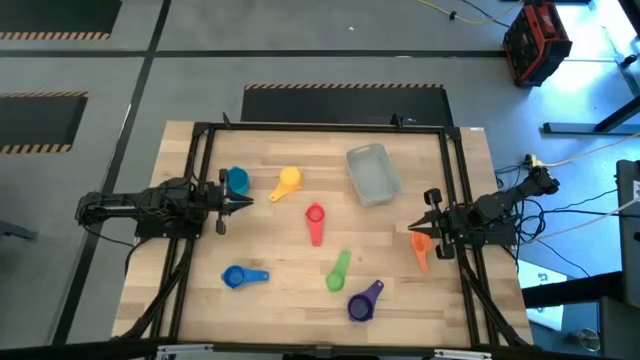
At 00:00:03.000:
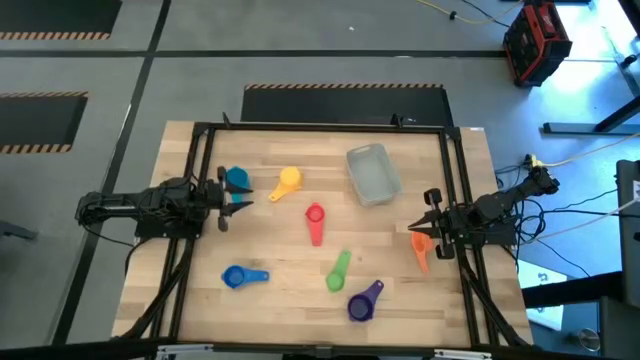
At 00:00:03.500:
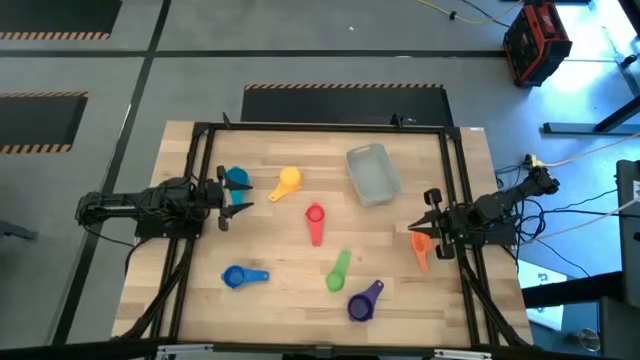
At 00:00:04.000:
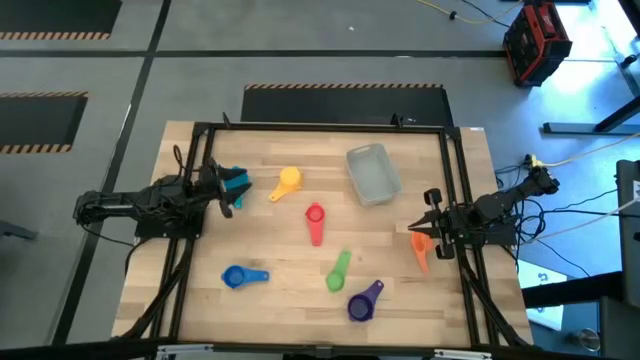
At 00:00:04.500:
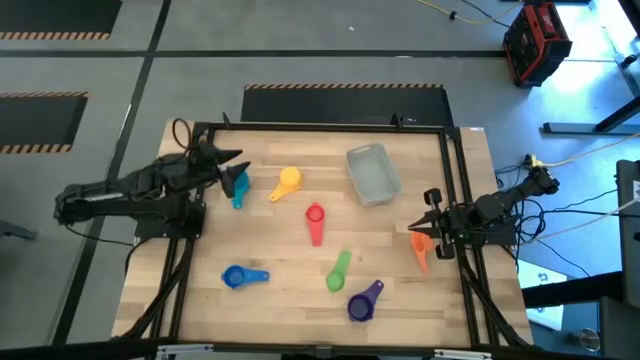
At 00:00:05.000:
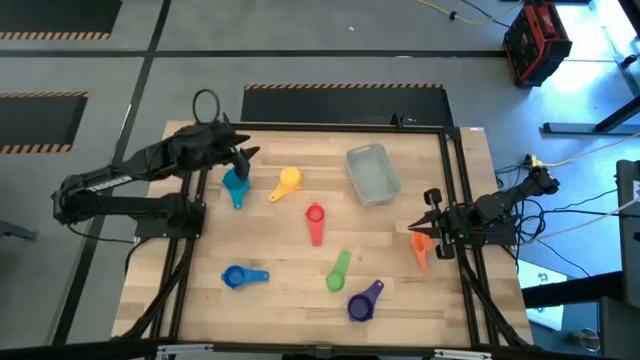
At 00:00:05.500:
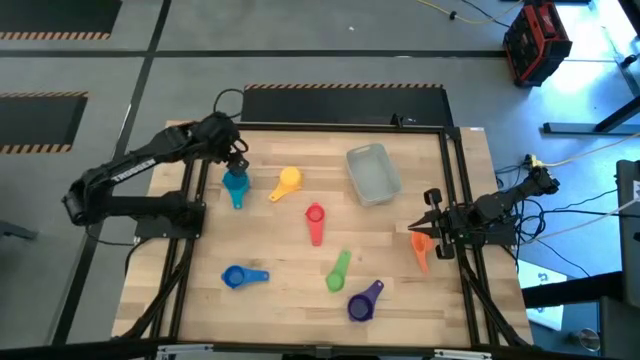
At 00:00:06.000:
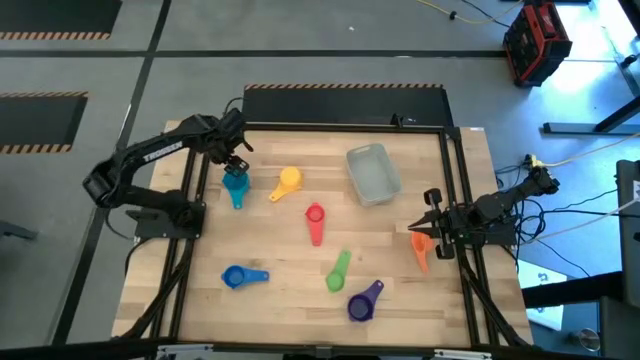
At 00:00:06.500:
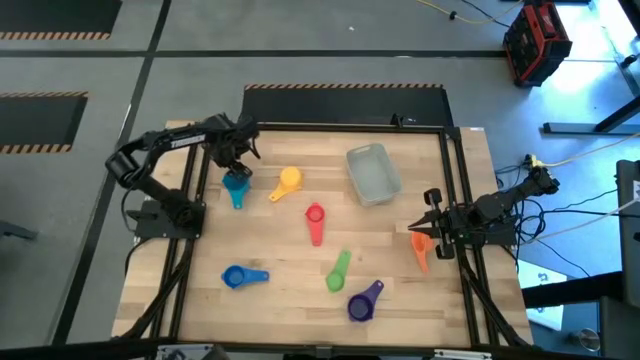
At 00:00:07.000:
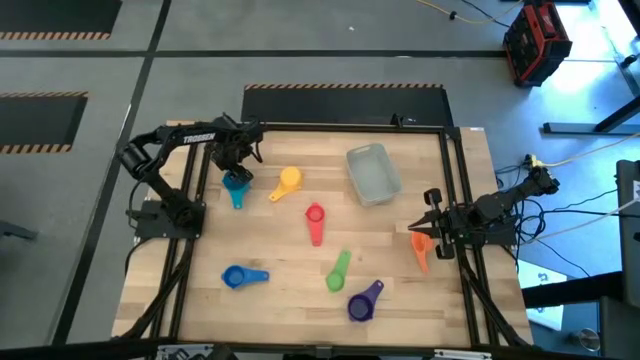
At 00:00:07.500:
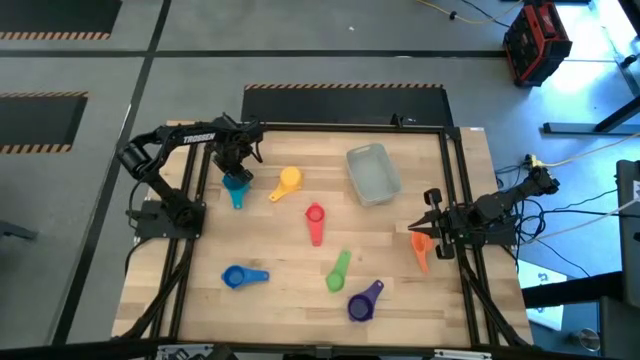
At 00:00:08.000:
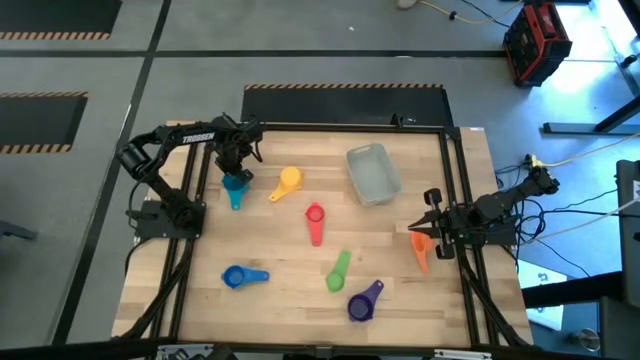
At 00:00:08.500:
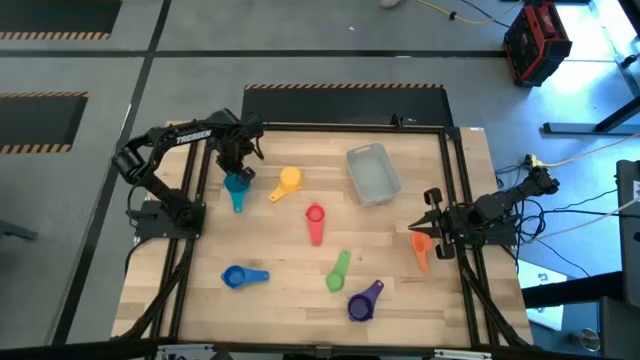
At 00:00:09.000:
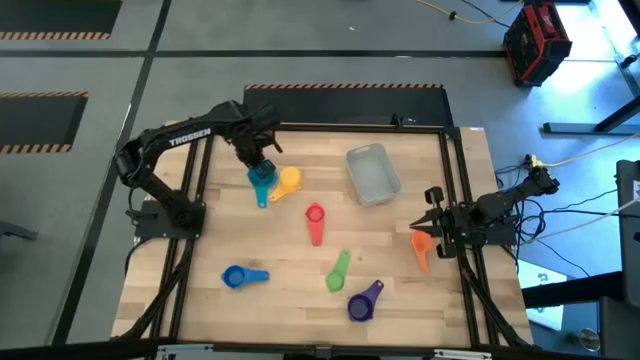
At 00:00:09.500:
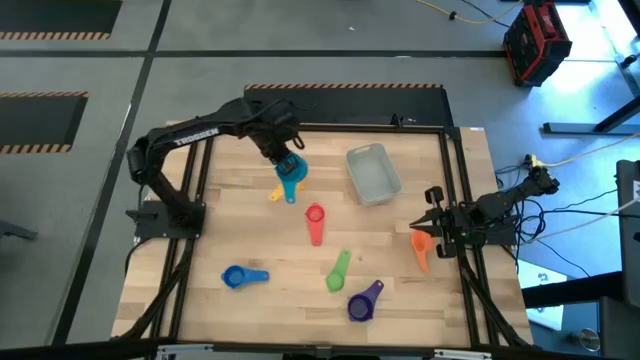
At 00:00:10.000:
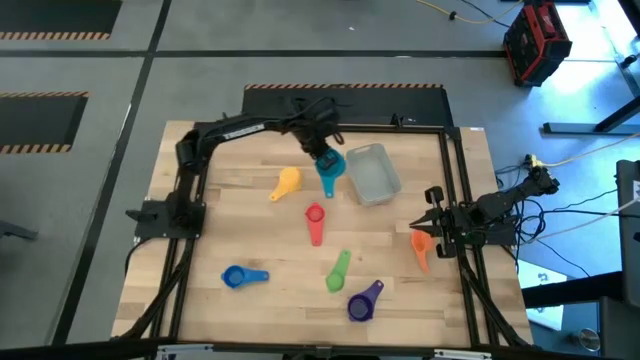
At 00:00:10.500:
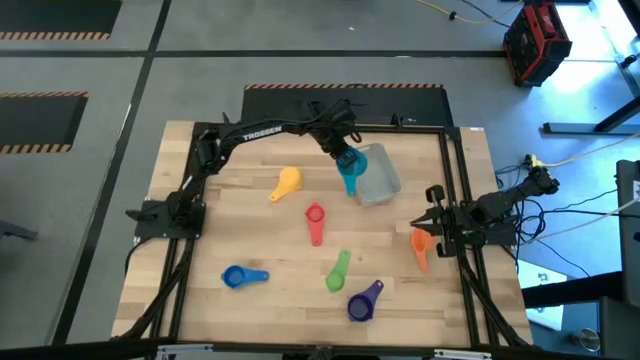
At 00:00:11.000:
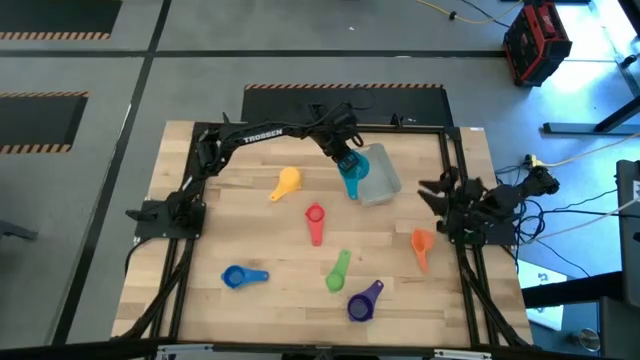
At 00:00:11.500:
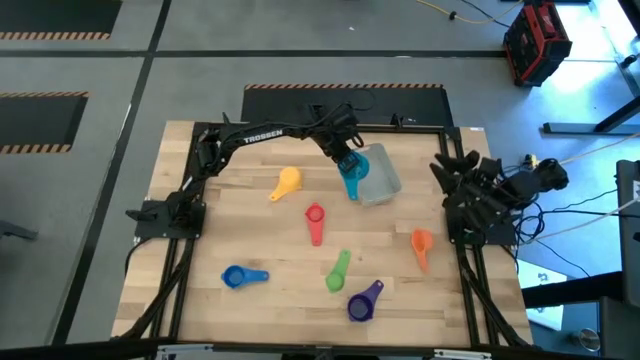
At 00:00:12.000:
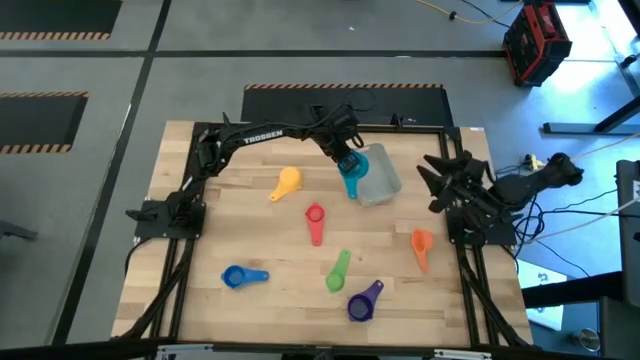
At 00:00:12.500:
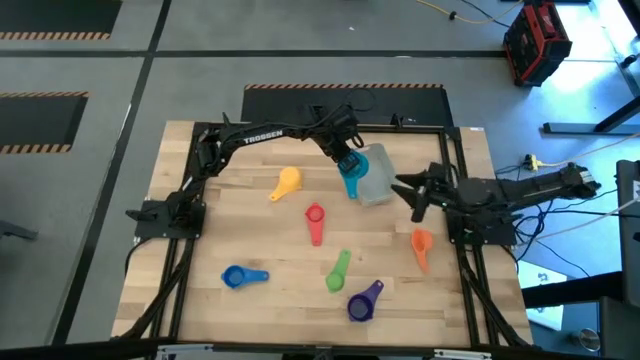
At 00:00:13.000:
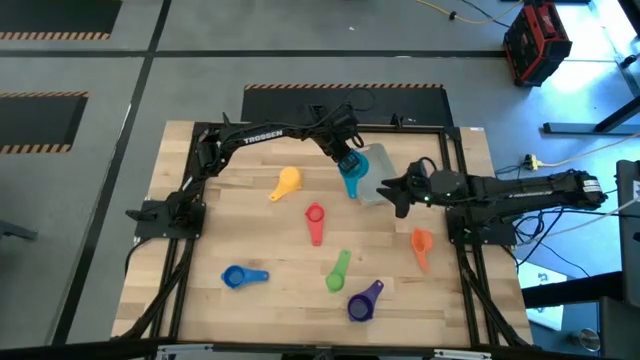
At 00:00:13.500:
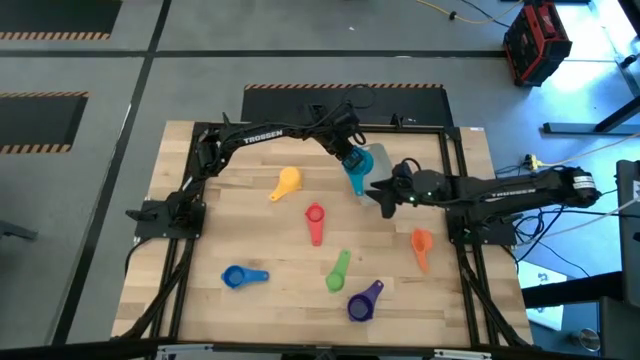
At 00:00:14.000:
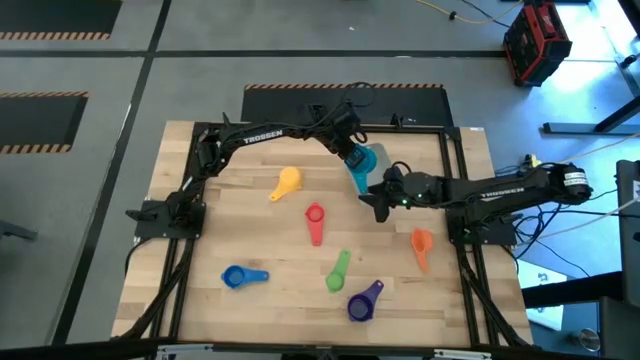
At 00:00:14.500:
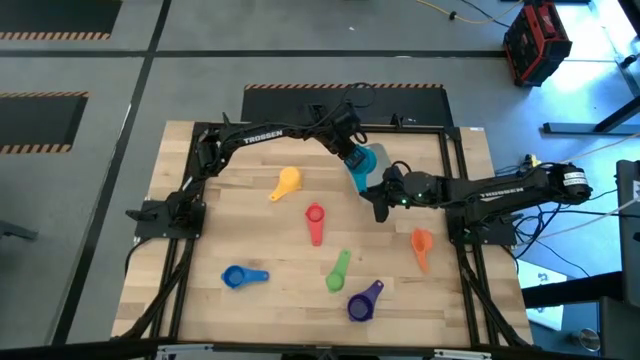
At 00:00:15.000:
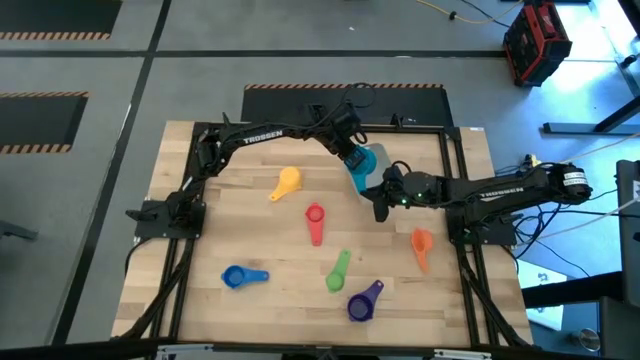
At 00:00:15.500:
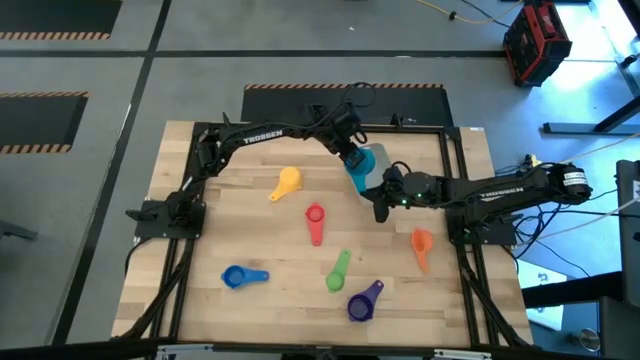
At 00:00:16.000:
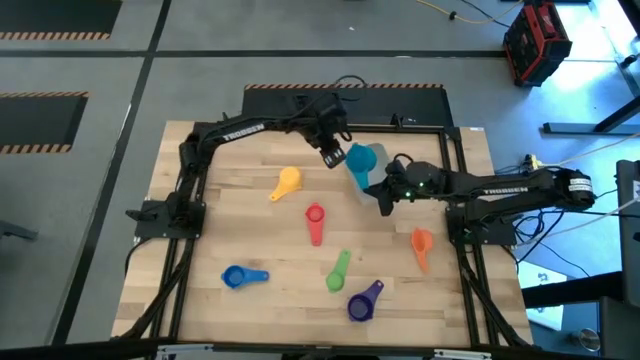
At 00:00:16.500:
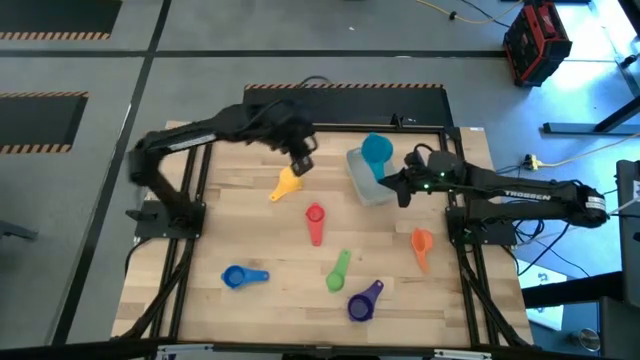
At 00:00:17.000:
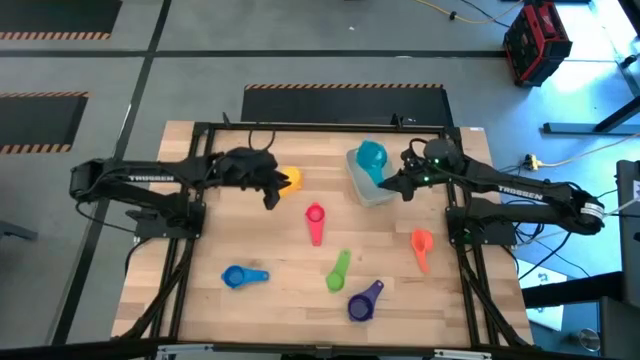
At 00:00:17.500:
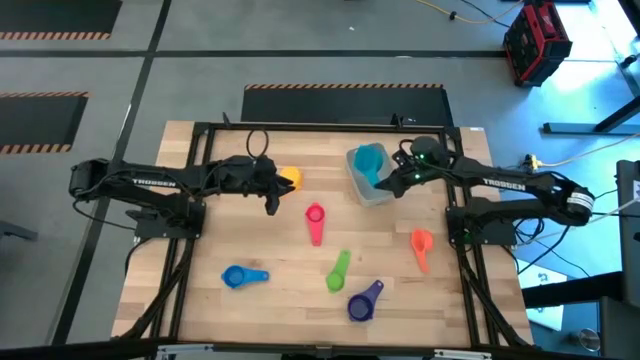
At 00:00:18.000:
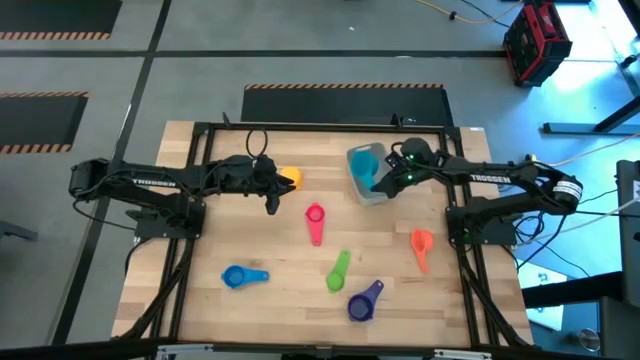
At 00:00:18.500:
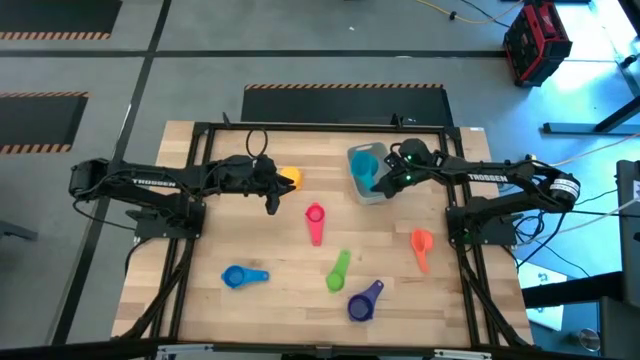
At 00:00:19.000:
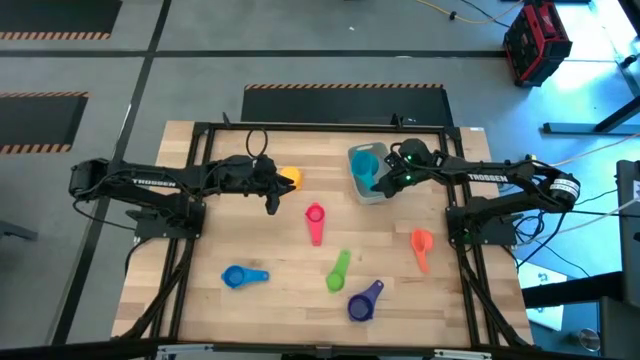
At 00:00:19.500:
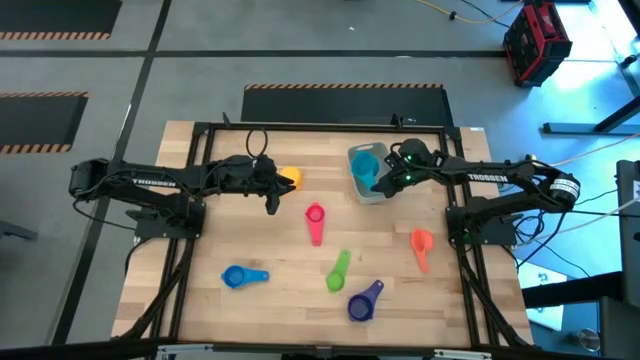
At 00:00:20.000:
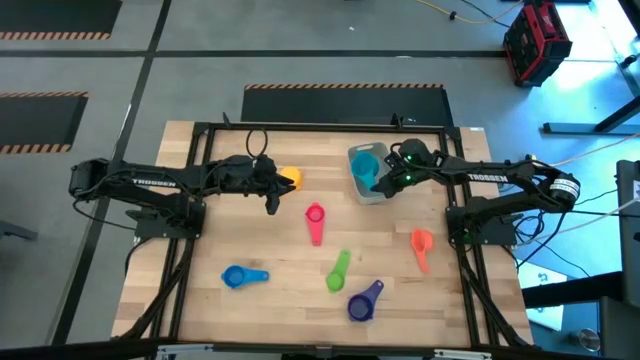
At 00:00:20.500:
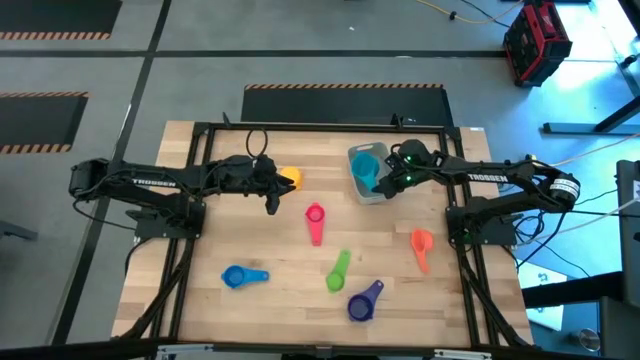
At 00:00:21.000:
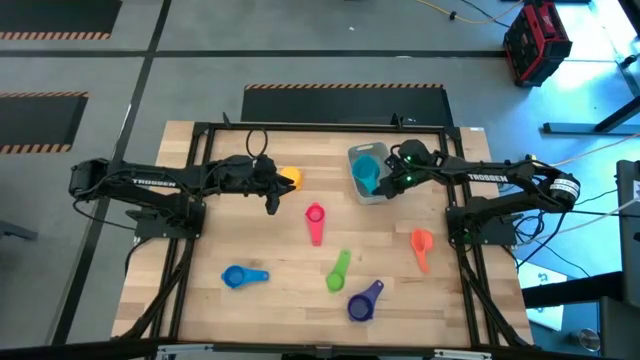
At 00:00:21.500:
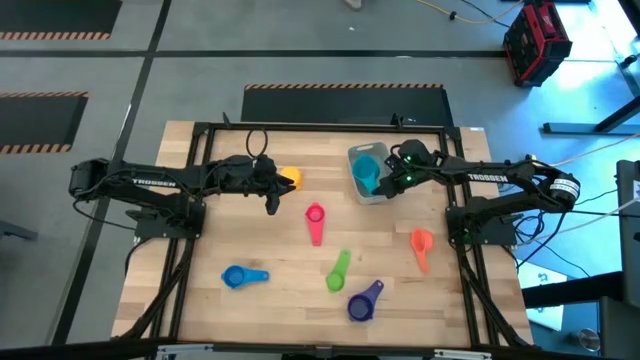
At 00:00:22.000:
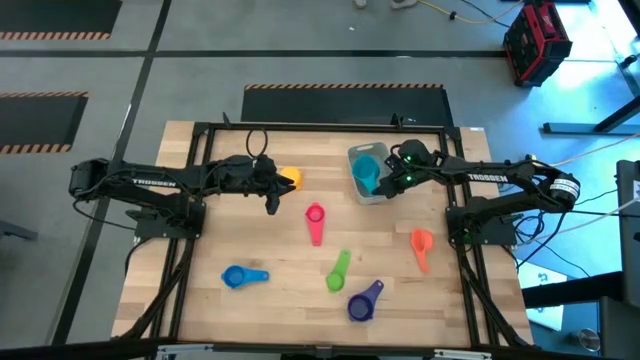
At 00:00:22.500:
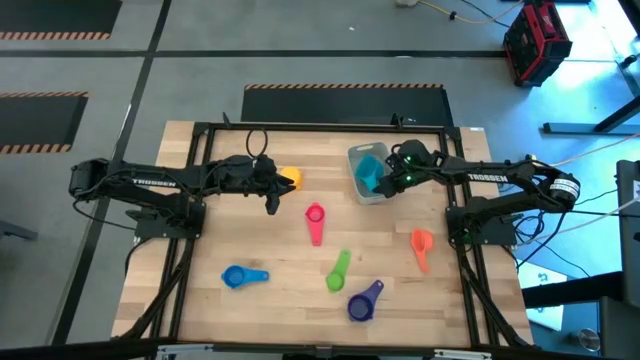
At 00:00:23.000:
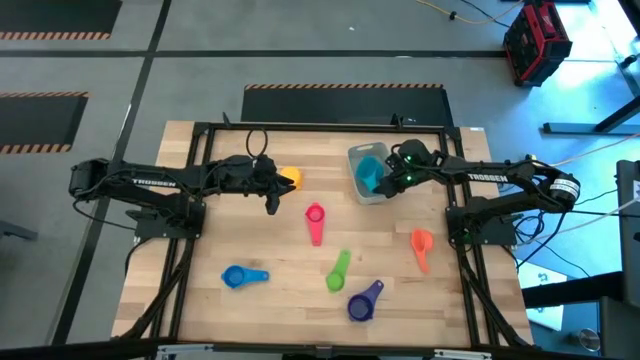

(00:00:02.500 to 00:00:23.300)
Task: Nest measuring cups in basket
Put the light blue measuring cup into the grey bin
